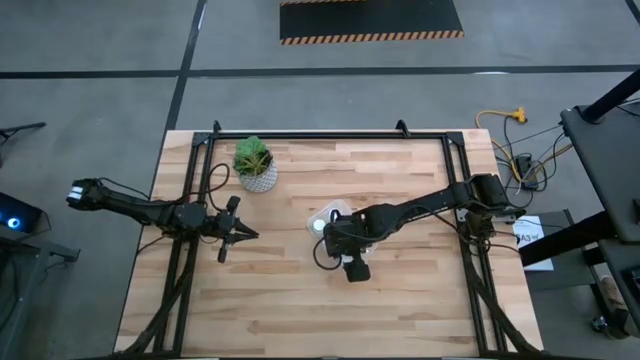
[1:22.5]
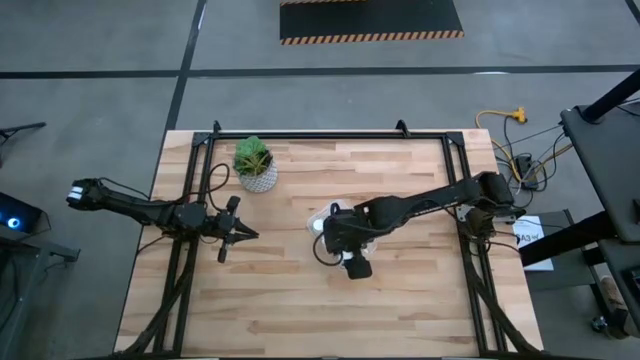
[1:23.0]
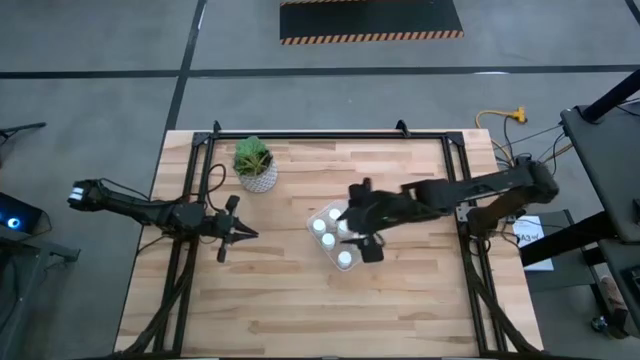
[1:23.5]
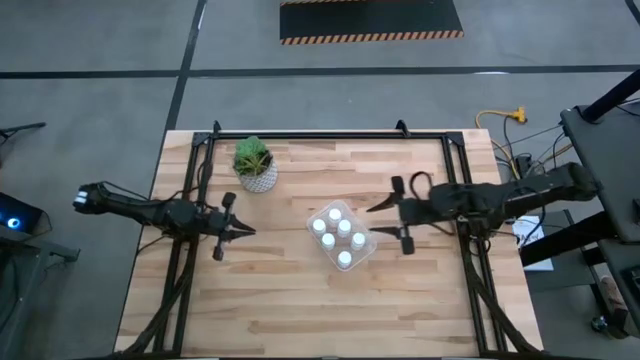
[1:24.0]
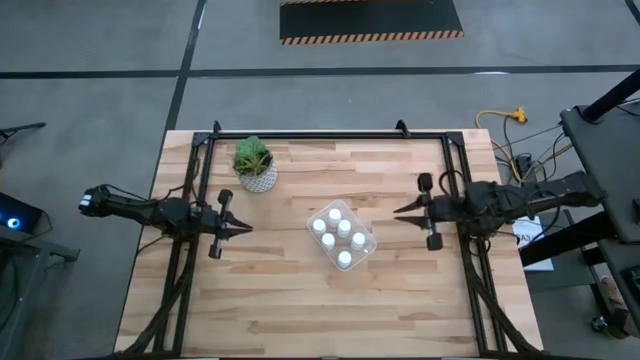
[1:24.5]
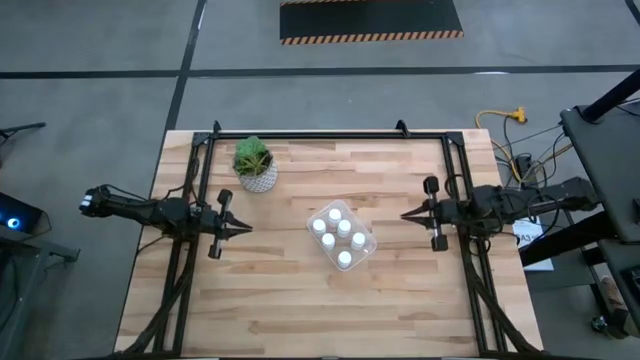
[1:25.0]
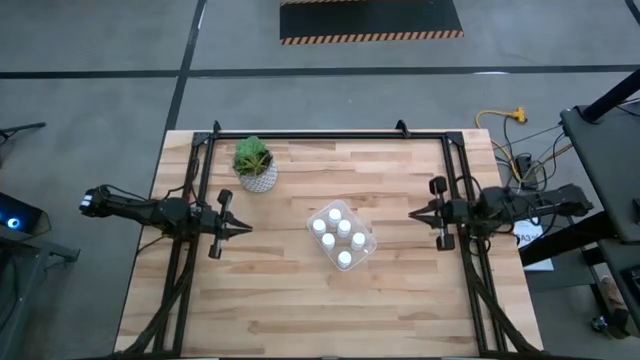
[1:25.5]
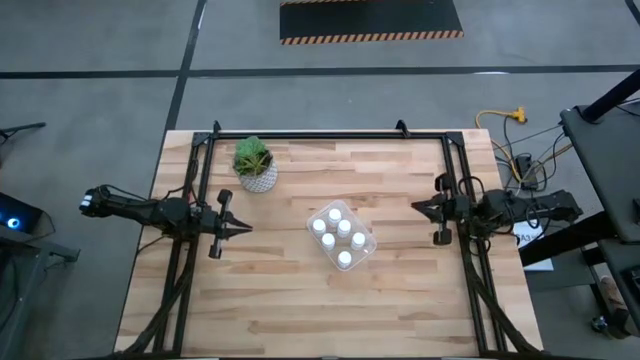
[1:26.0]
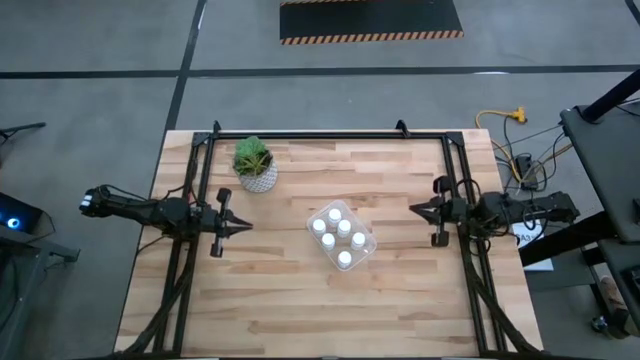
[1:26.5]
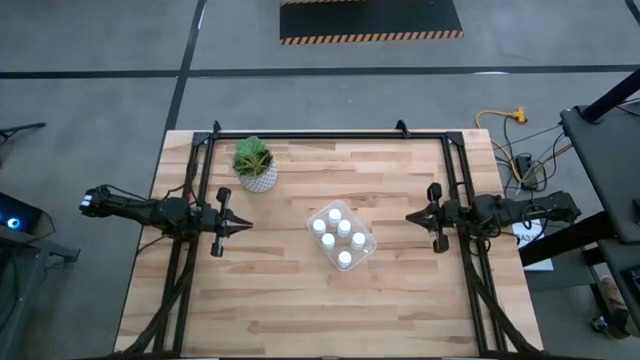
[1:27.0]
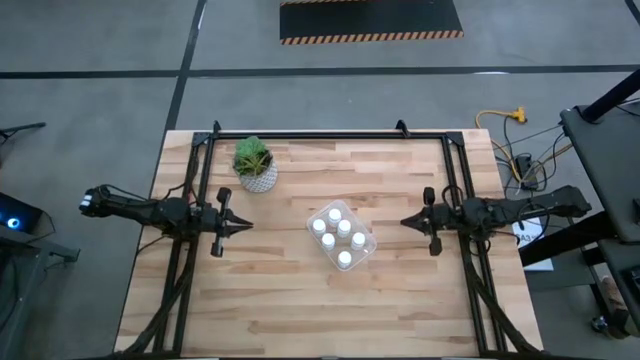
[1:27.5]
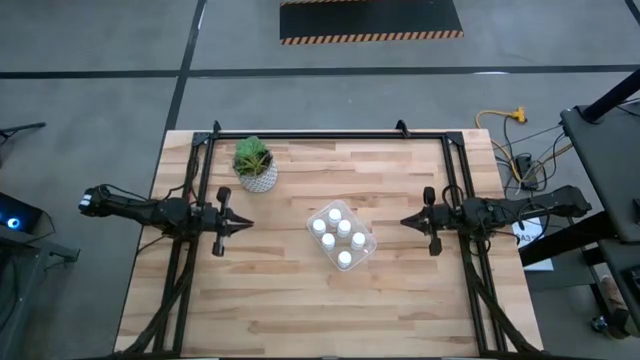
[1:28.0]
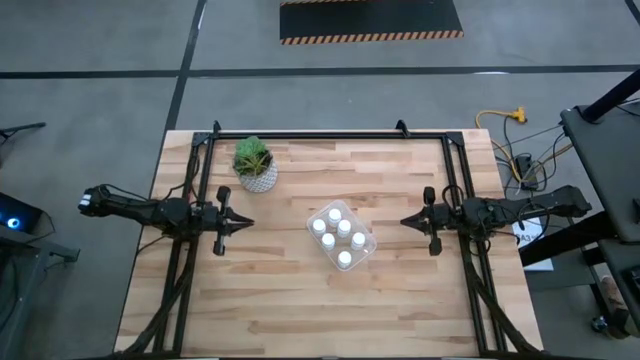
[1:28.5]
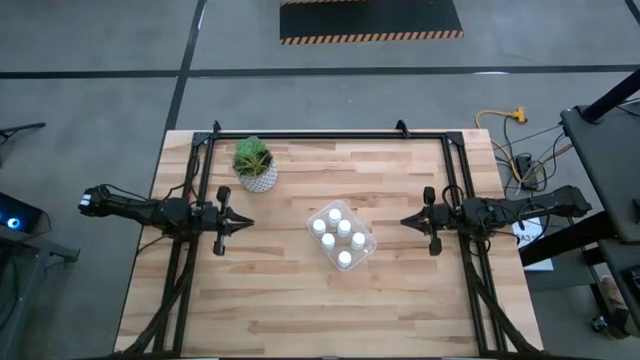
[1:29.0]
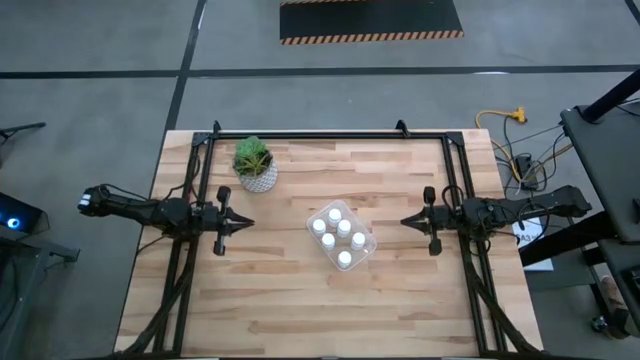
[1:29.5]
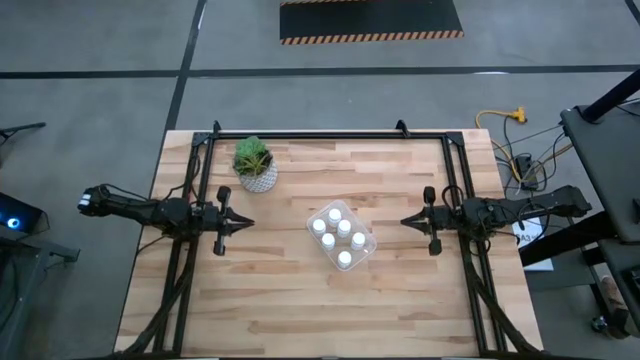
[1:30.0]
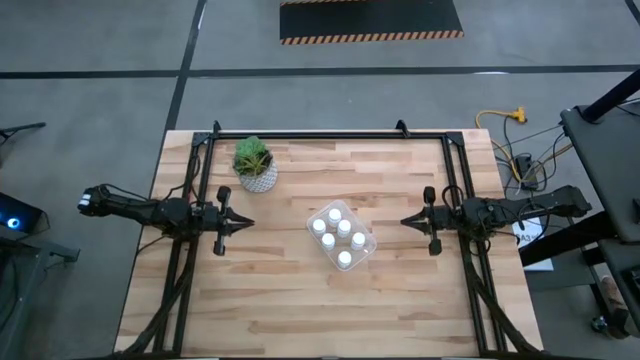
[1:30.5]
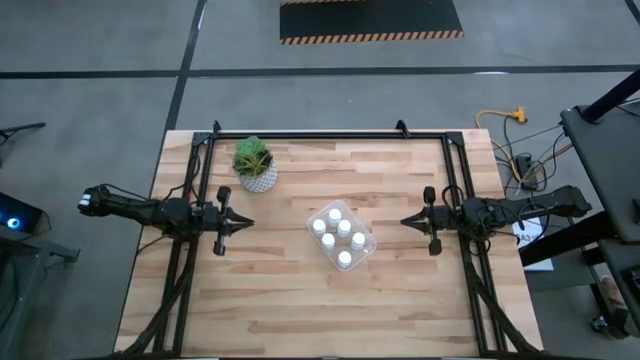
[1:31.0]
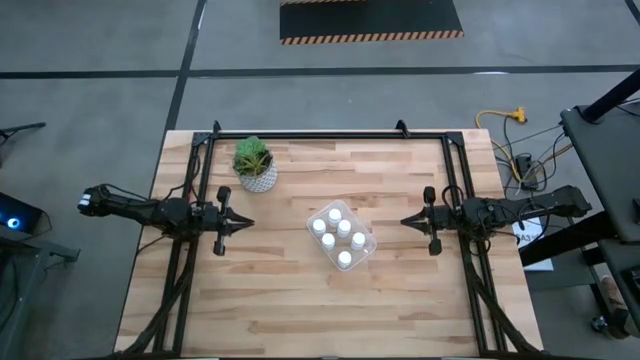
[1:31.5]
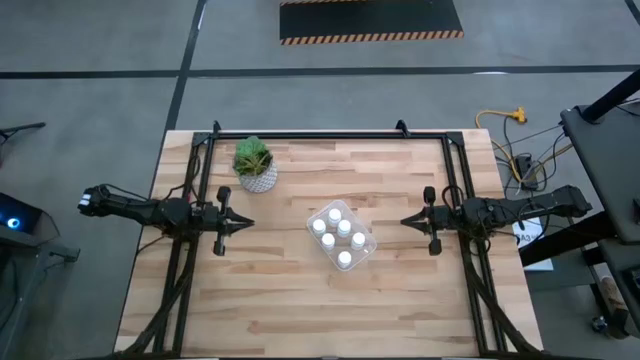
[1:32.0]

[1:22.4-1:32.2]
Task: Pick and place pill bottles into a basket
Return to Home Position

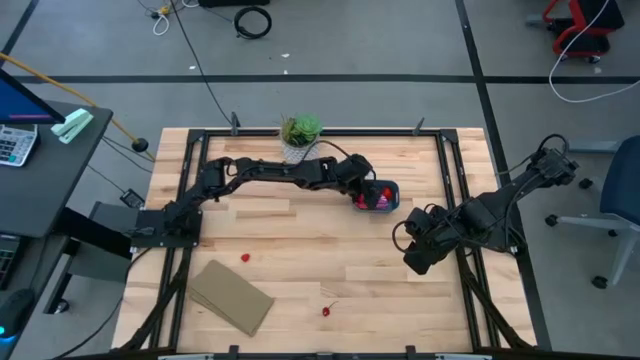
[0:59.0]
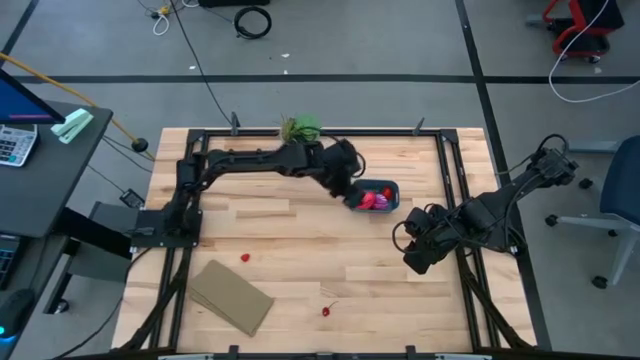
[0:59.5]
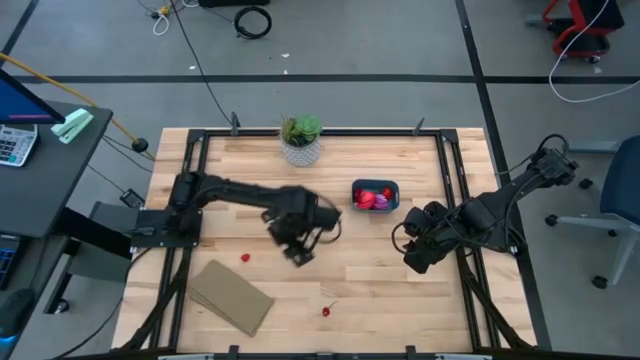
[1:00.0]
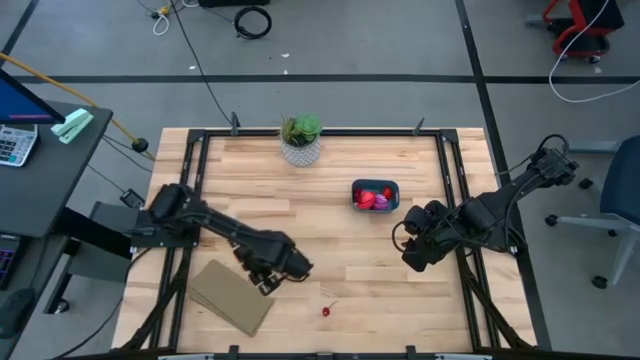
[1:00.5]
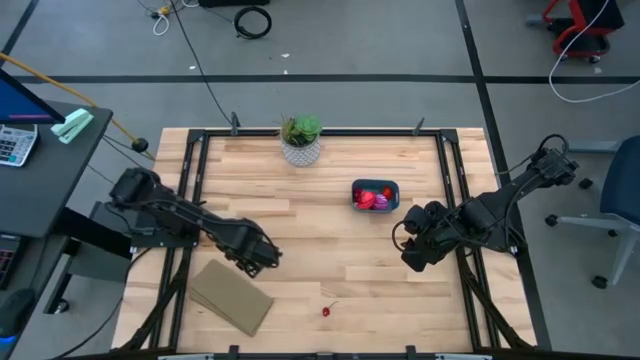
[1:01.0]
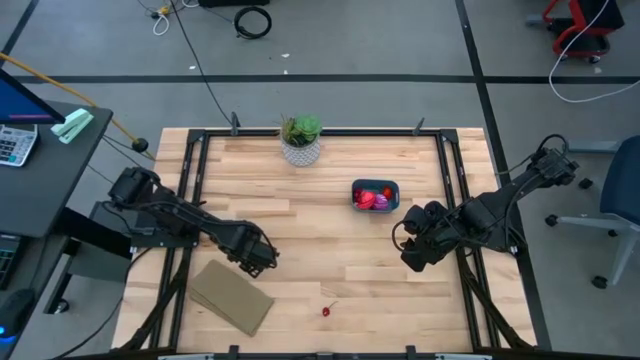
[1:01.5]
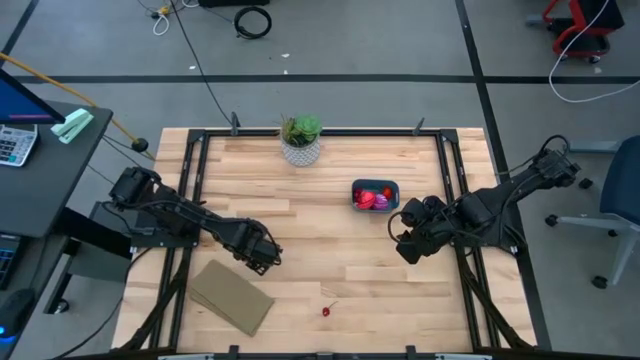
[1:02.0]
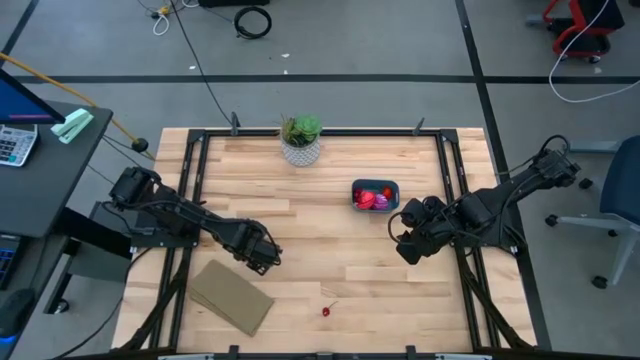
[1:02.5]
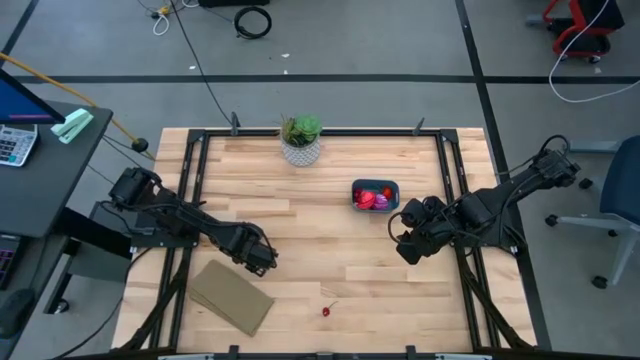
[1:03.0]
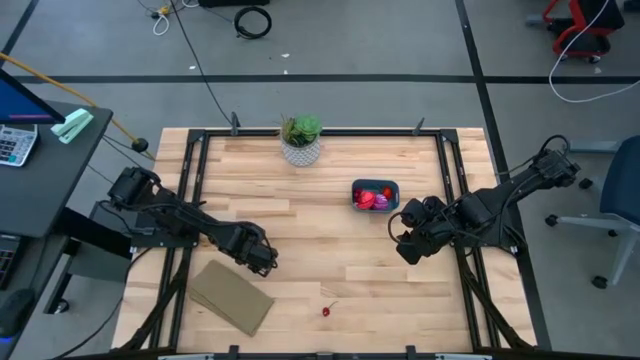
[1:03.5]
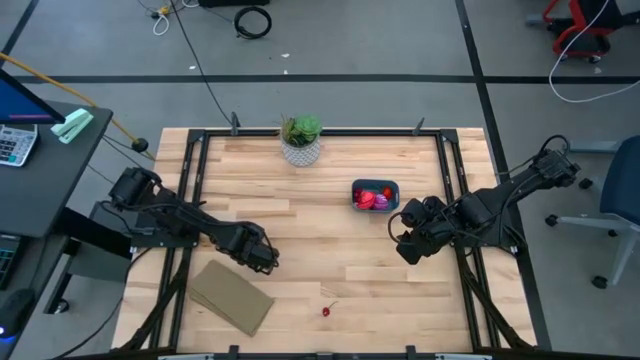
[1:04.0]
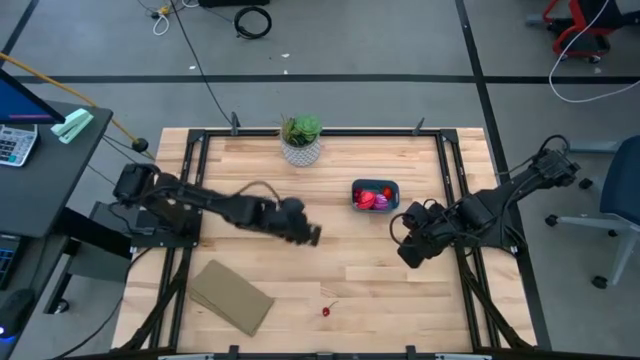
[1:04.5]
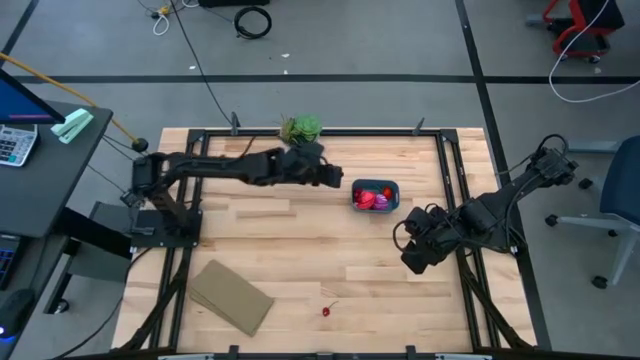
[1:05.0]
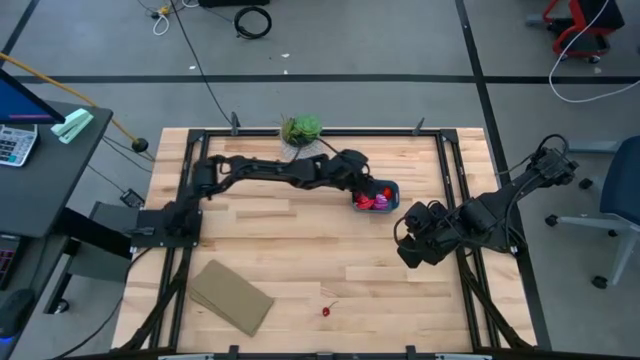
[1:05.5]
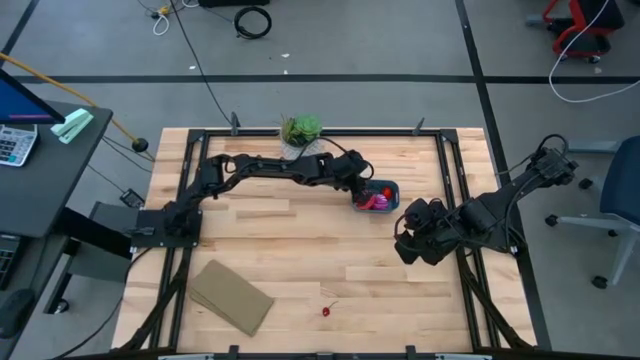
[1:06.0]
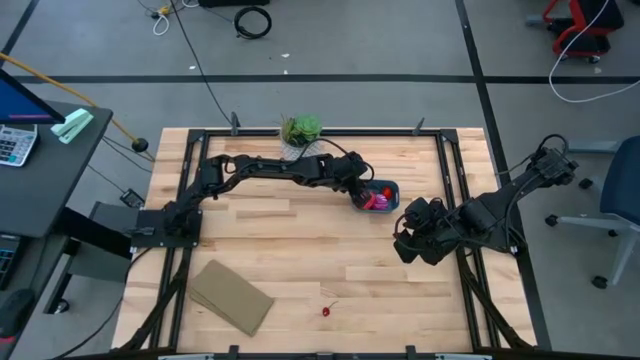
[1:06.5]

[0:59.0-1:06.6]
Task: Pick and placing Produce into tupperware
Put the red raspberry into the blue bin

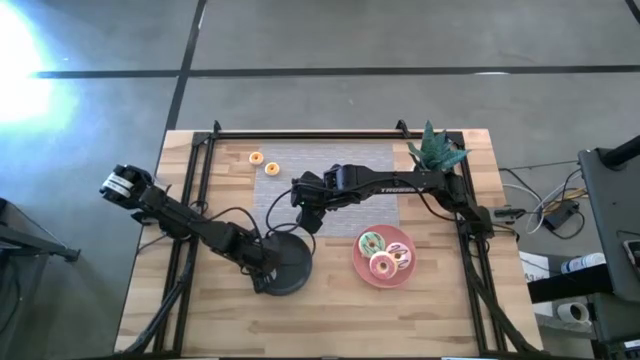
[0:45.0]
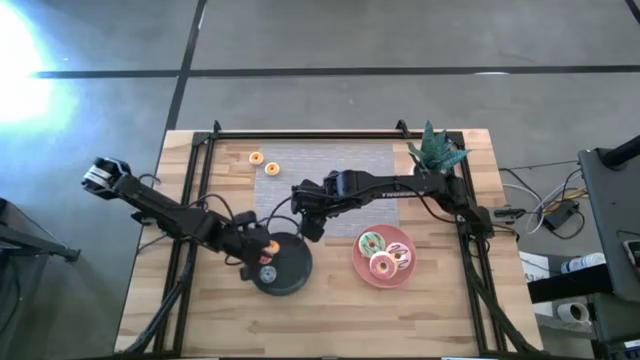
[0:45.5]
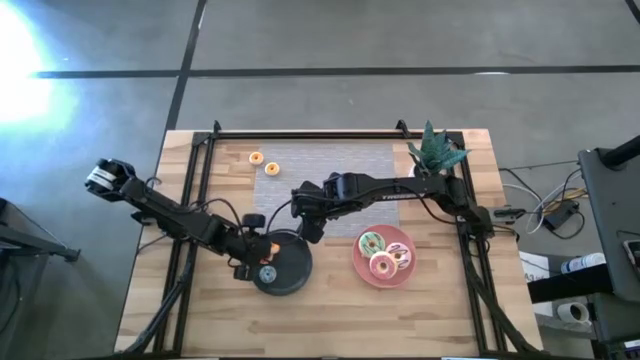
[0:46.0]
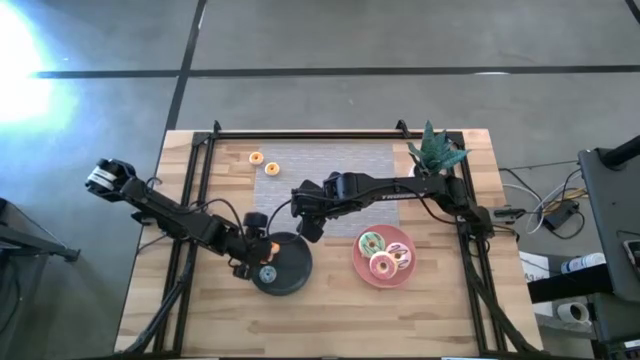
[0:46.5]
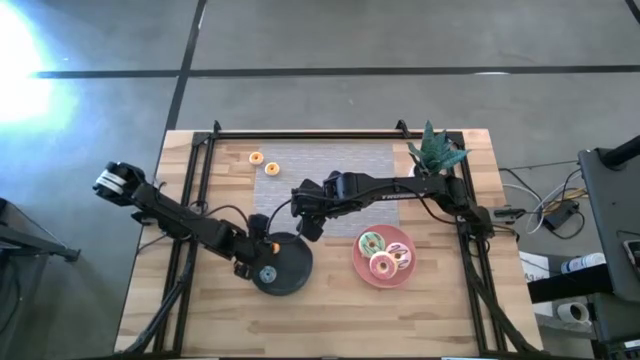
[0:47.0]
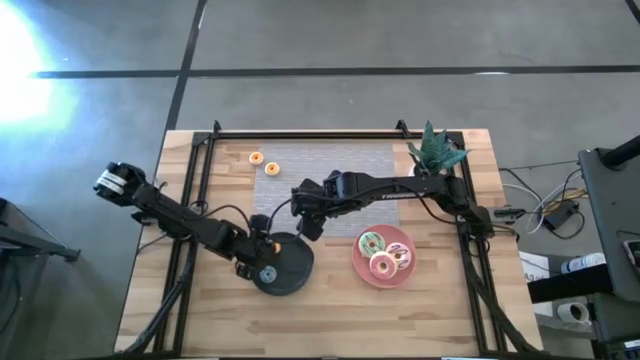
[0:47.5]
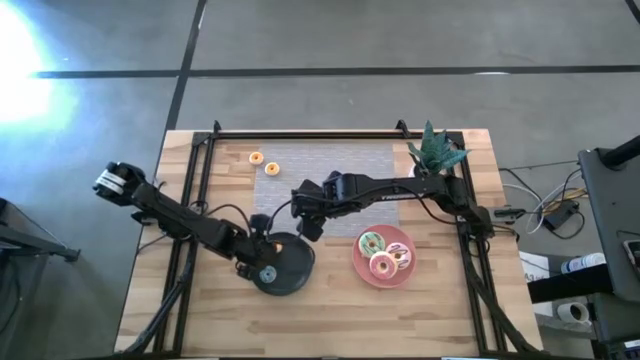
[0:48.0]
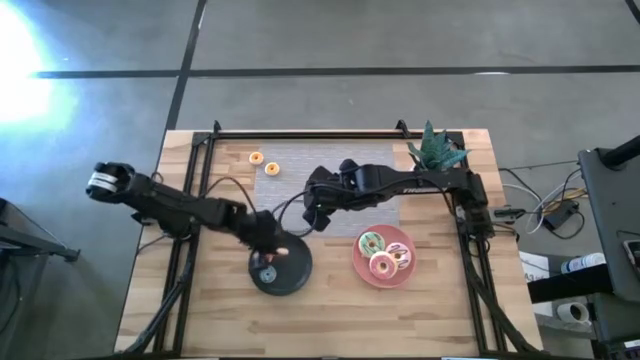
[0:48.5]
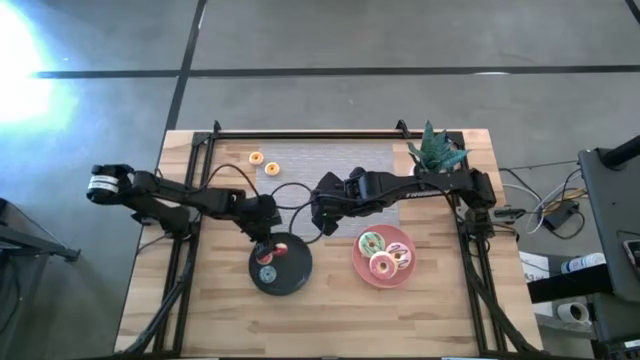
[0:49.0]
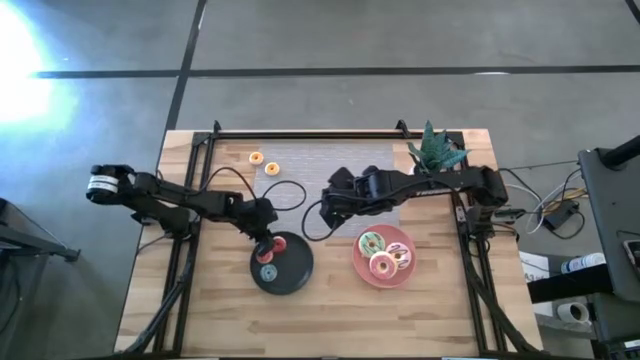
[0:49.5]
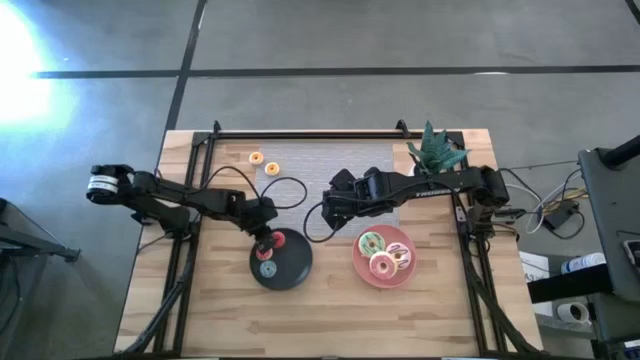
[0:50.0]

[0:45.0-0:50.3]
Task: Pick & Place donuts
Adjust the small red donut on the black plate
